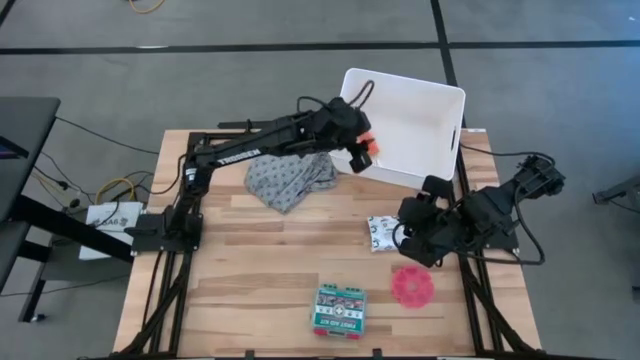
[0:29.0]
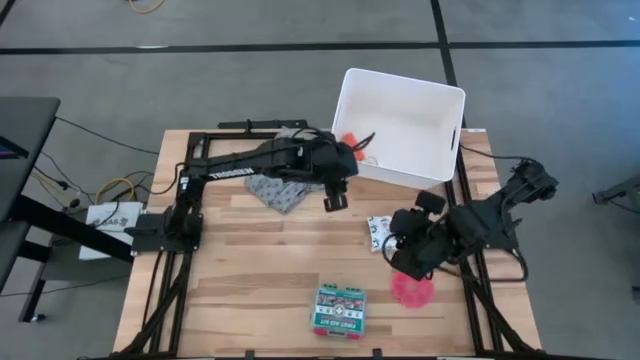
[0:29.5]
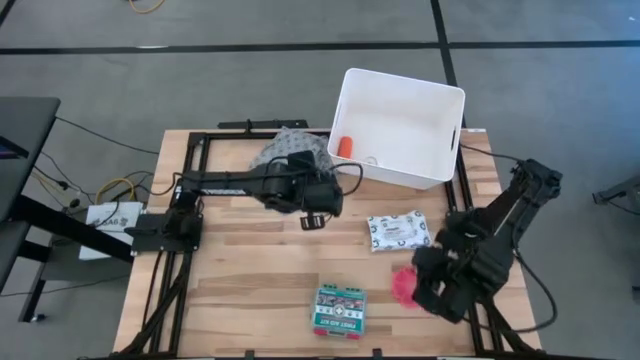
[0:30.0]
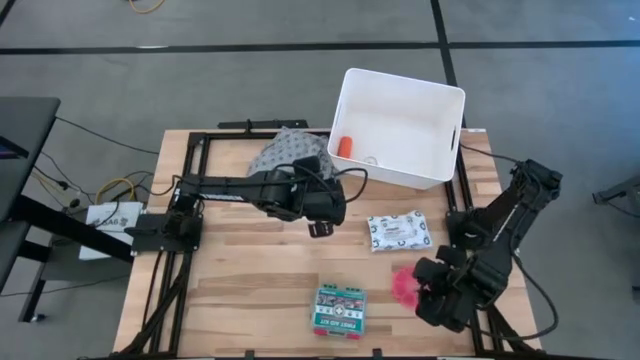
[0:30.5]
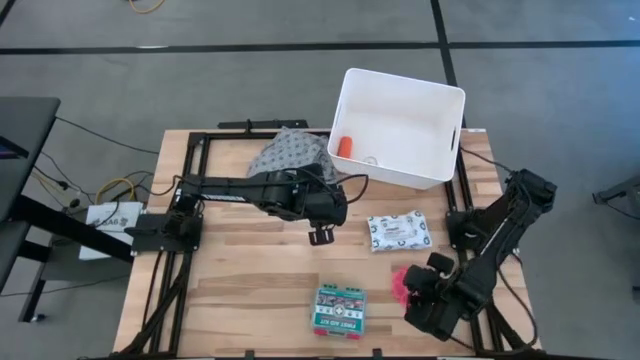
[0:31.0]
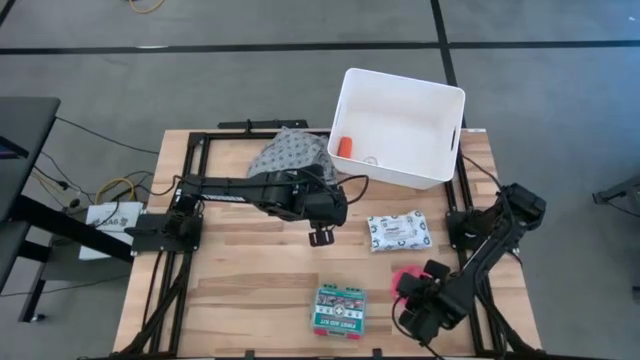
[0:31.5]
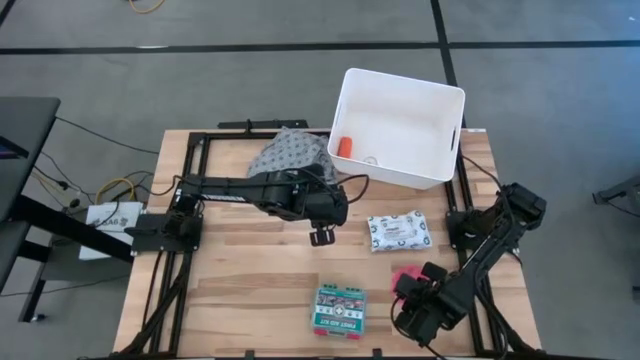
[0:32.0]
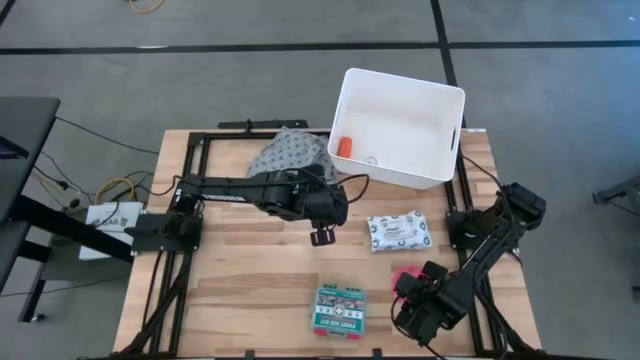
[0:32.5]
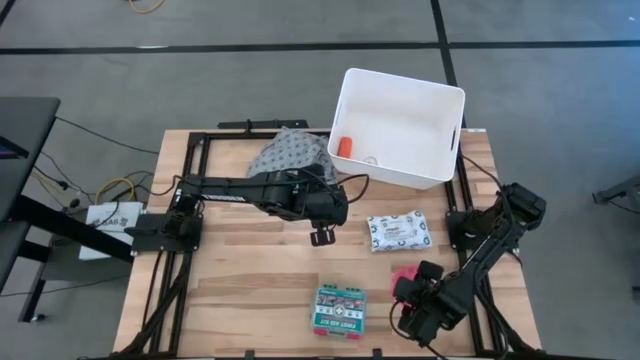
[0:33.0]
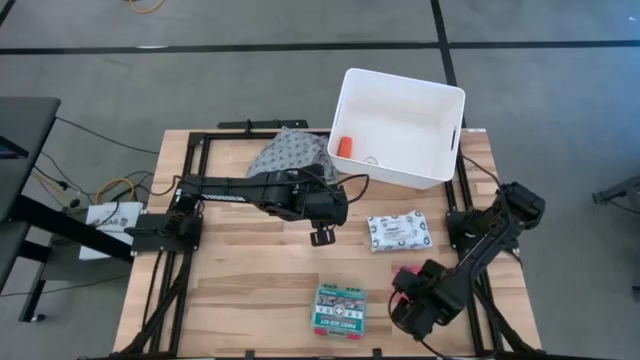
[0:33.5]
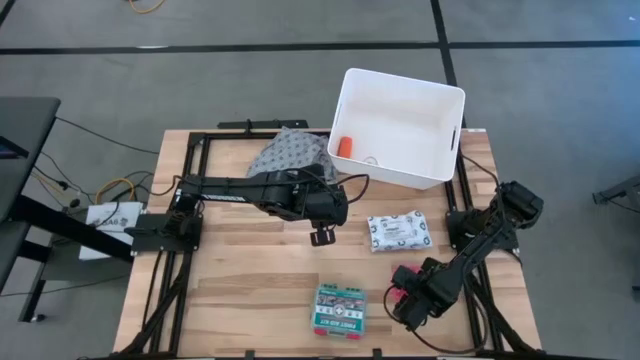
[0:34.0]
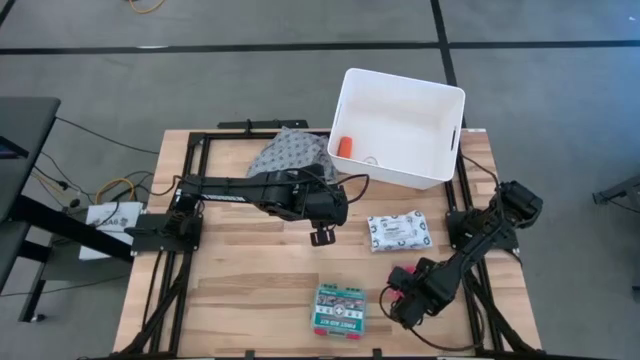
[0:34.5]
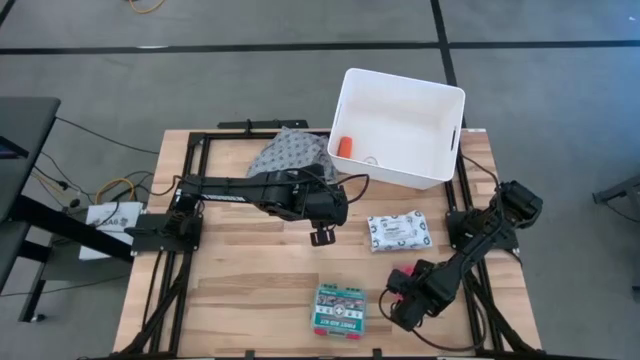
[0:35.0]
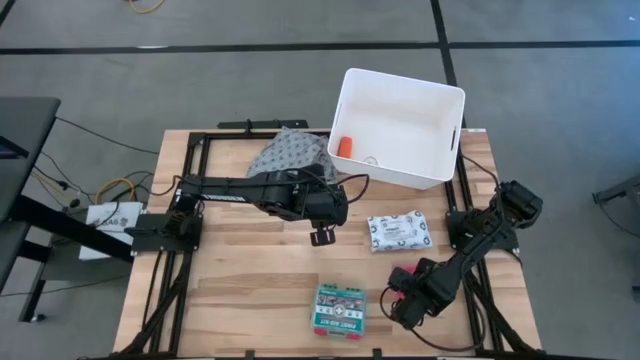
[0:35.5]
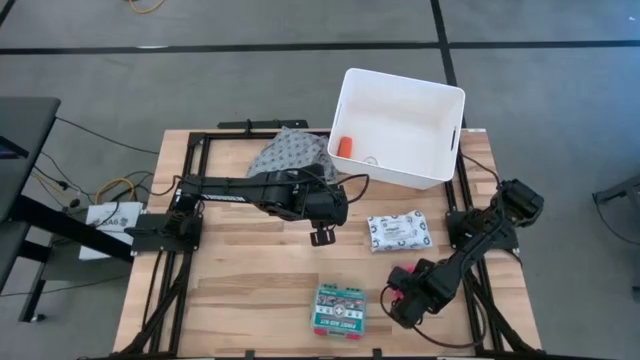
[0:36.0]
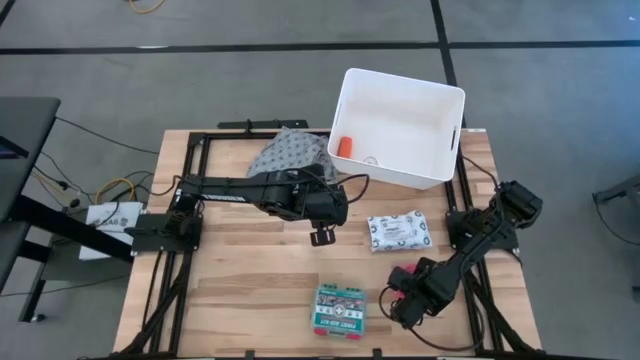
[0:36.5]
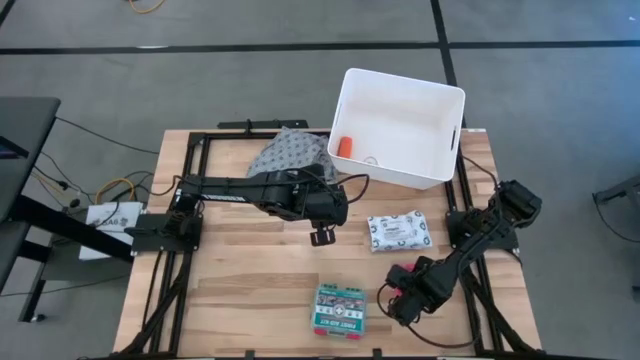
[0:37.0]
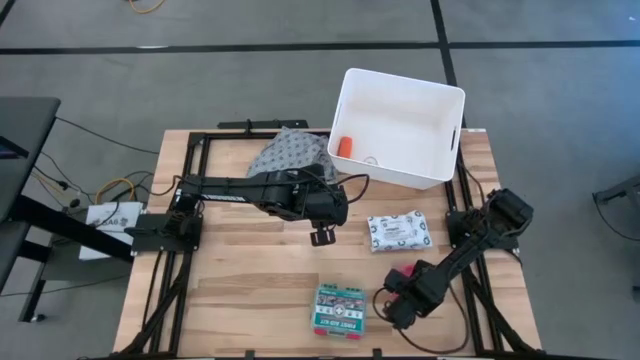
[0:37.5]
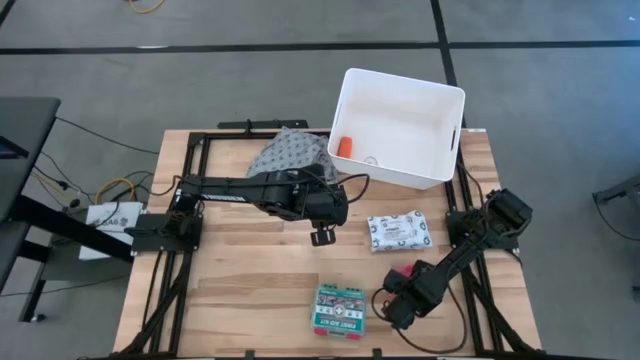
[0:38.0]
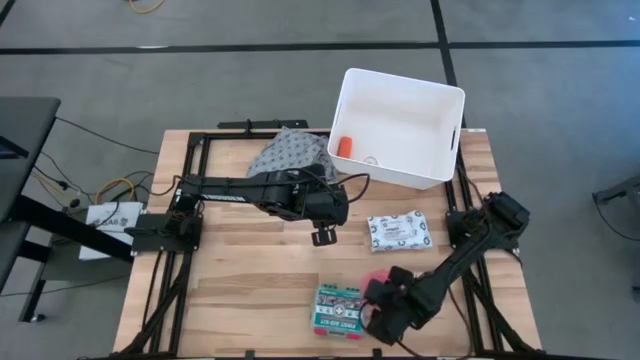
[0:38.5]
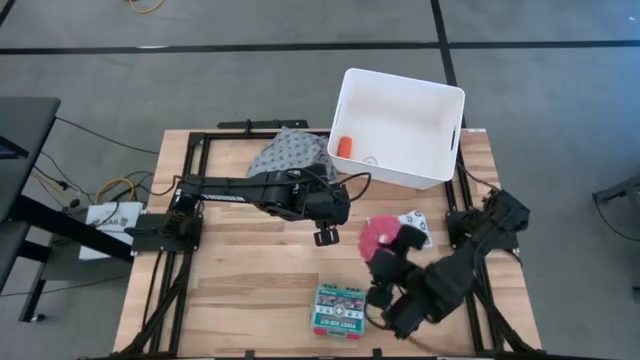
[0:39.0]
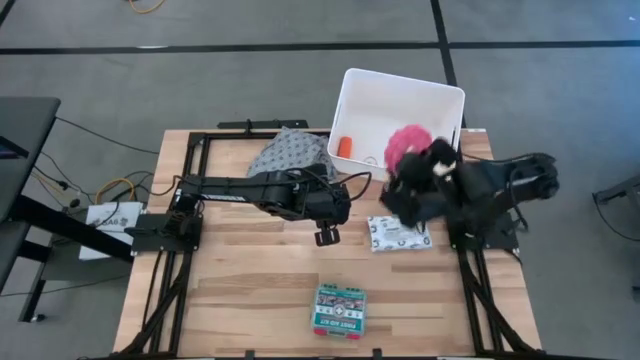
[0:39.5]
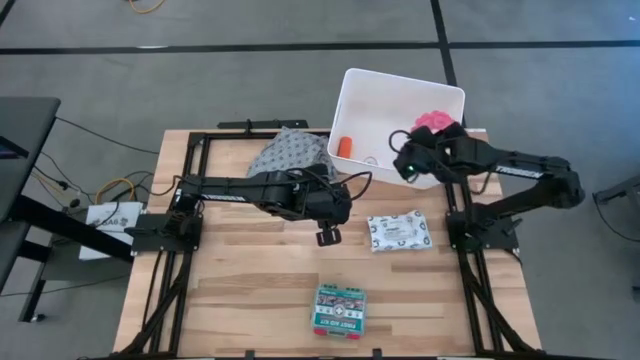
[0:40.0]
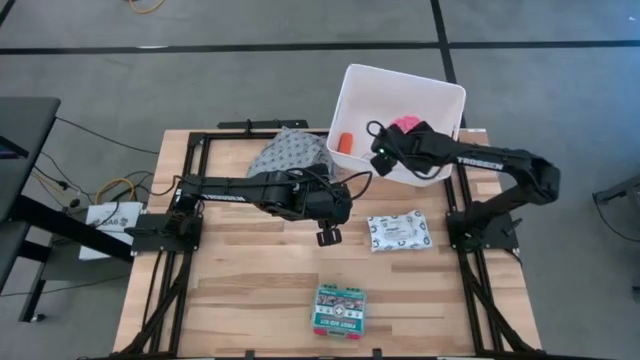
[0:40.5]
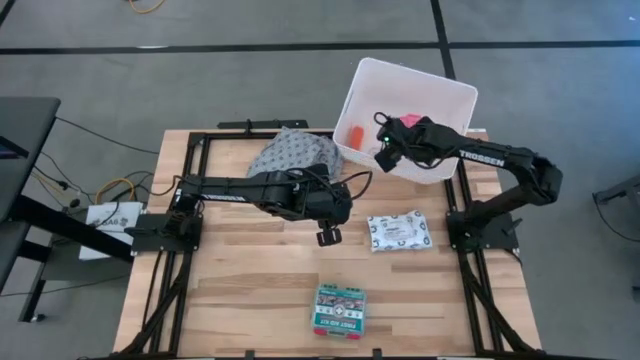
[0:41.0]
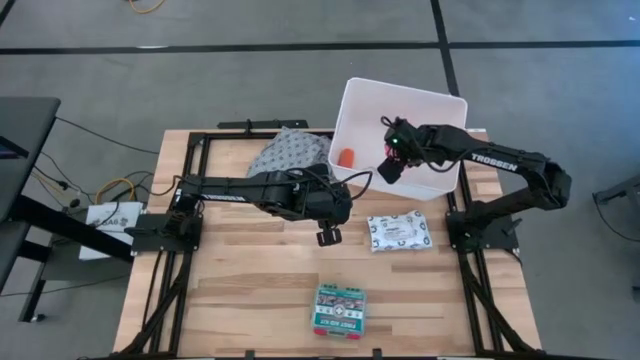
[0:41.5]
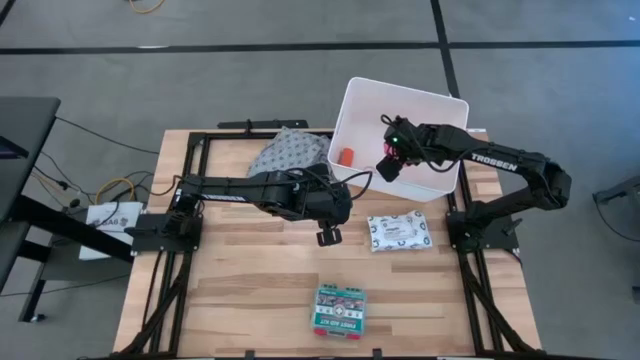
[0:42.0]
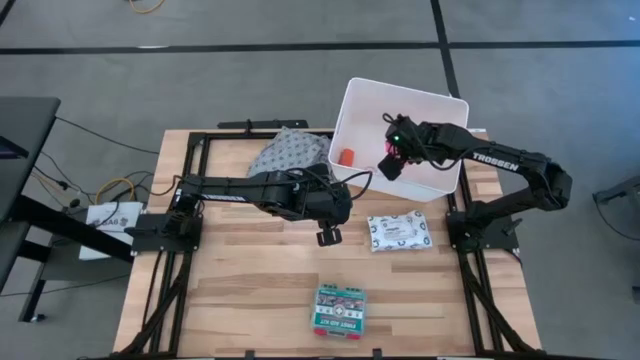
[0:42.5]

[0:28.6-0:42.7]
Task: Pick & place medical supplies in basket/bin
Put the pink organizer in the white bin

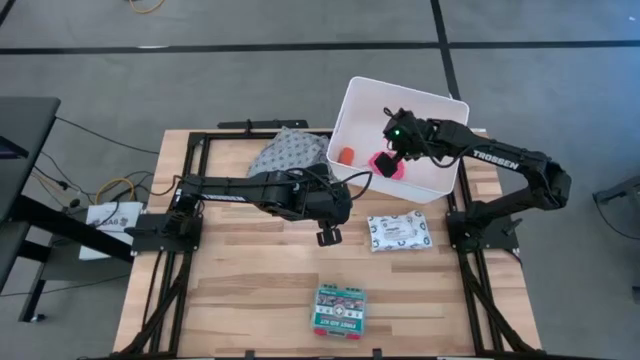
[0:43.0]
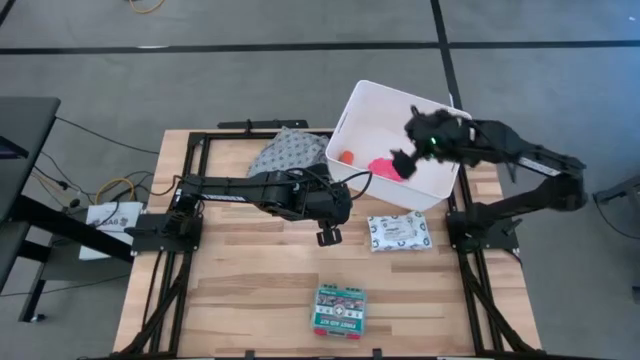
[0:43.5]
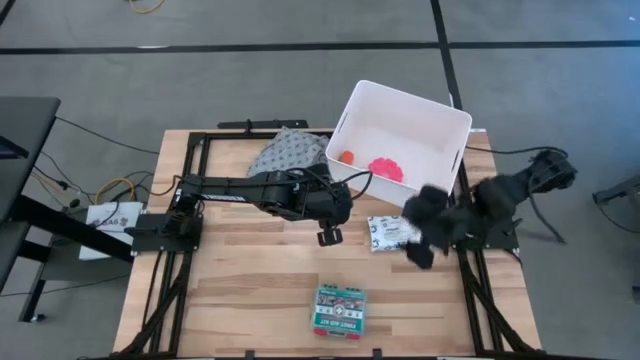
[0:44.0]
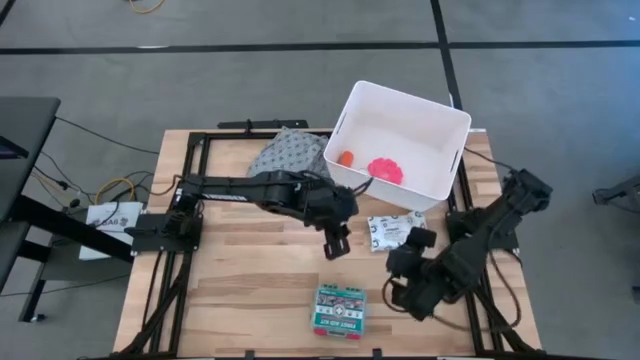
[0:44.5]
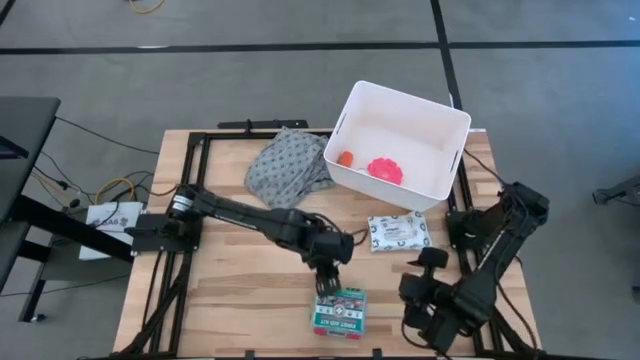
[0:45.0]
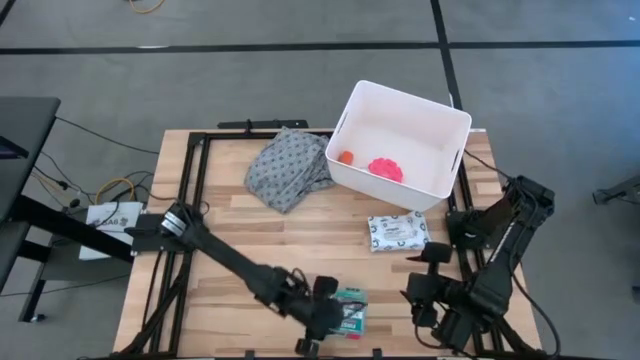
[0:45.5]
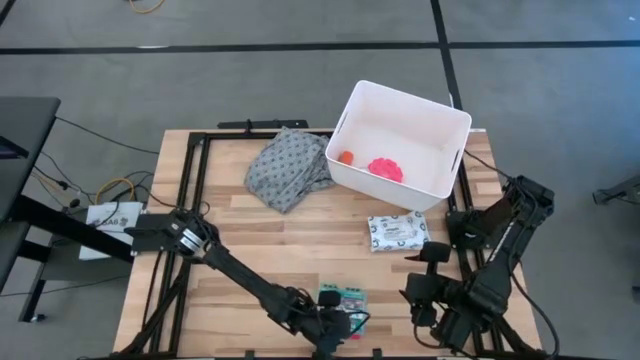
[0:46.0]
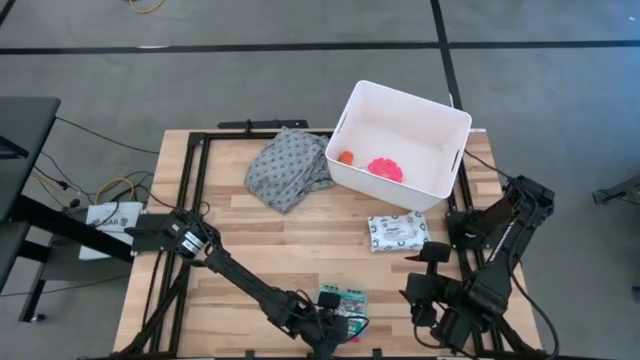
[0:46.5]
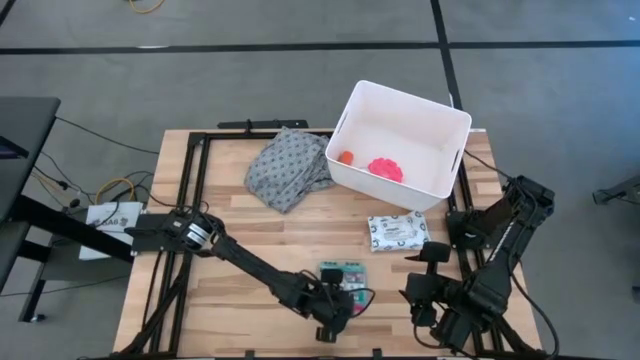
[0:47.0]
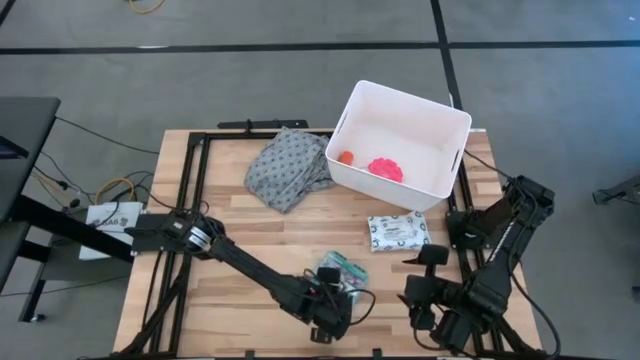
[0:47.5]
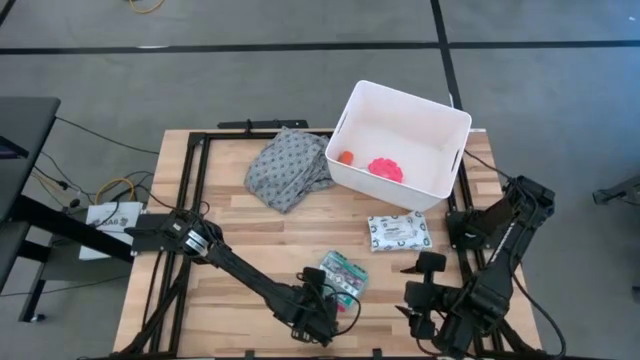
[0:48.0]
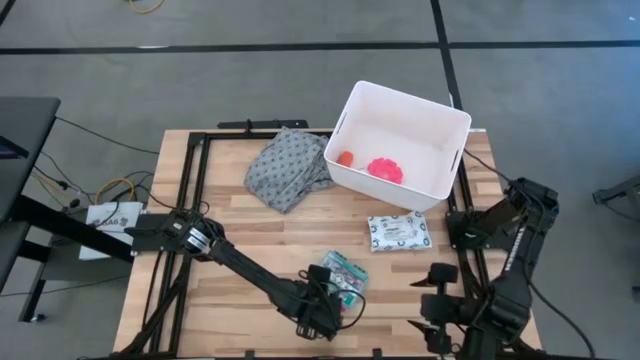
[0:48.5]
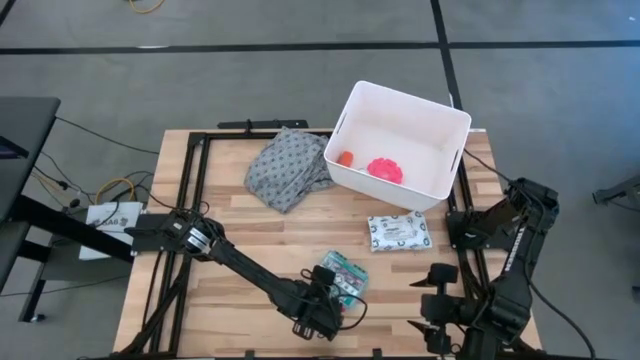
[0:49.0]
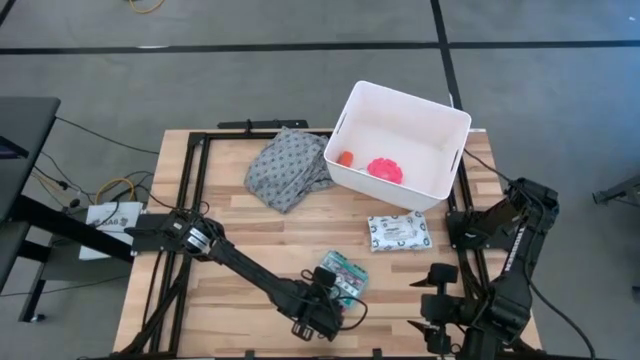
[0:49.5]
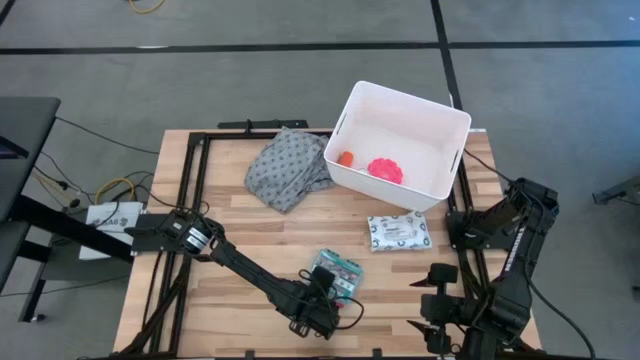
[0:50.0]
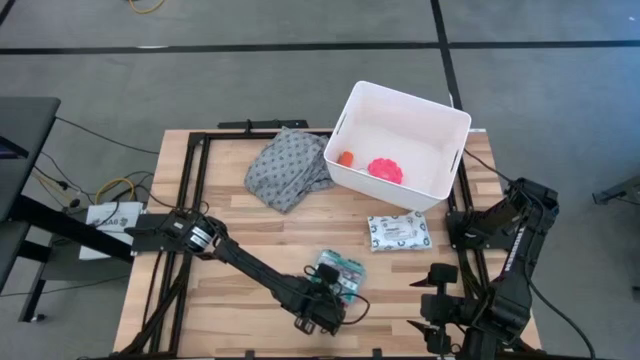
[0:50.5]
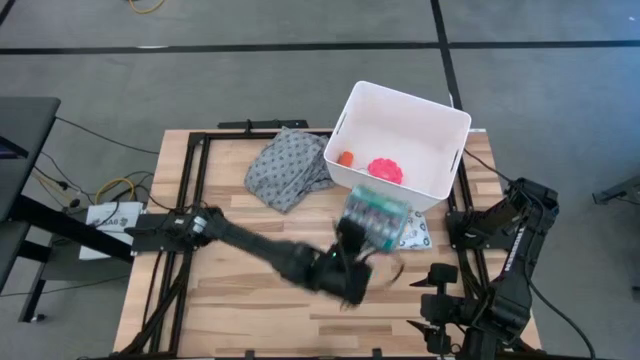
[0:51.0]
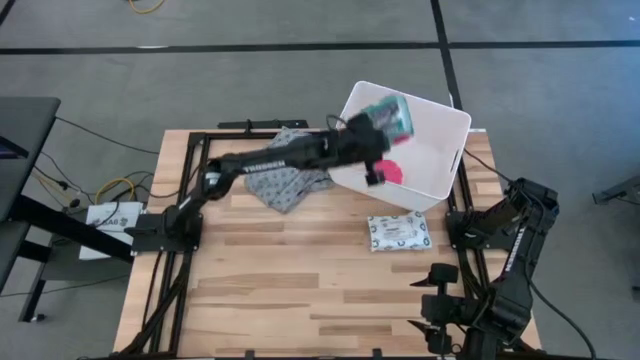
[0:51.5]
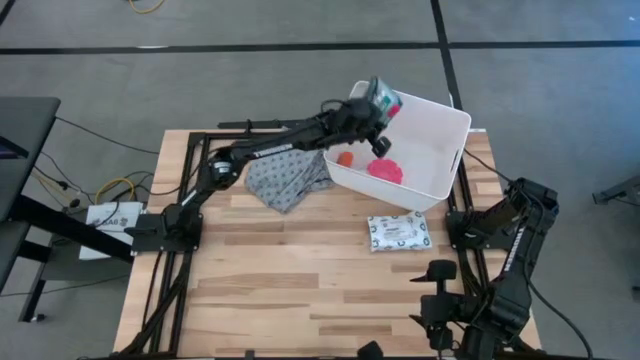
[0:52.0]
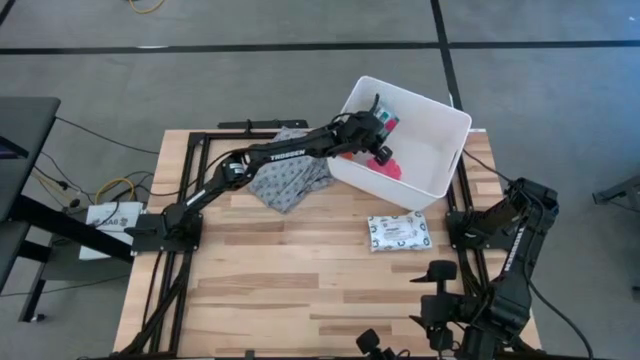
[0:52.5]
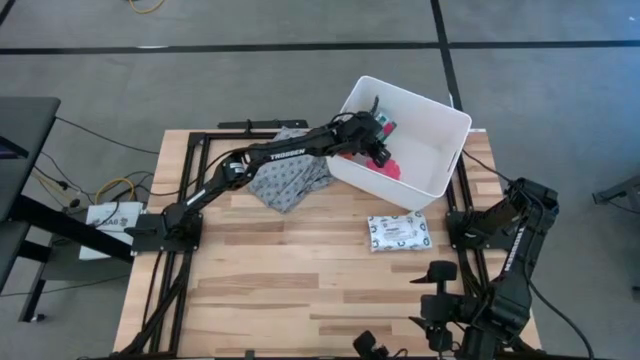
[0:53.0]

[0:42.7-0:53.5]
Put the first aid kit in the white bin
